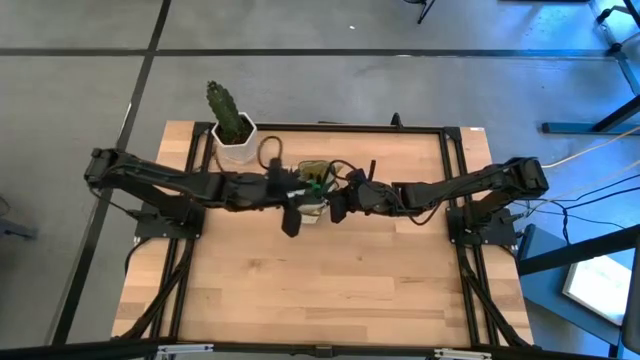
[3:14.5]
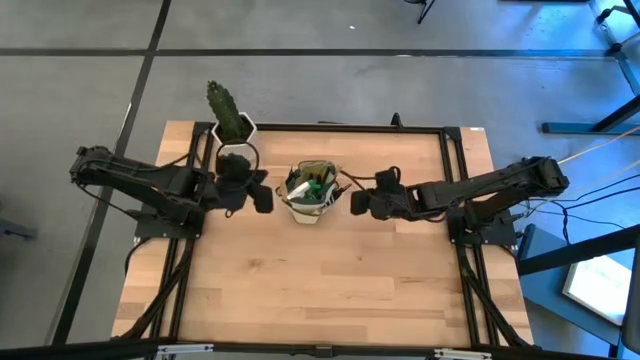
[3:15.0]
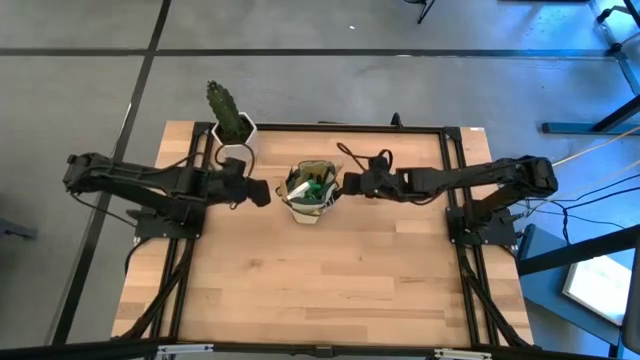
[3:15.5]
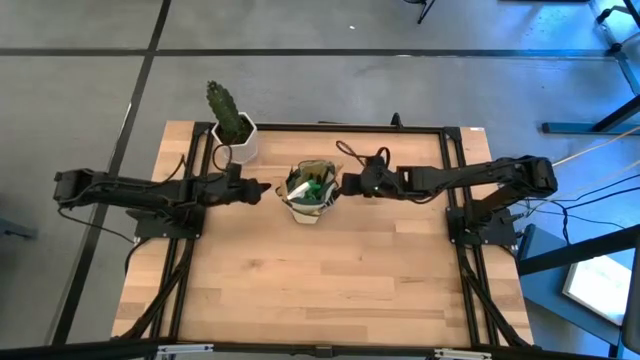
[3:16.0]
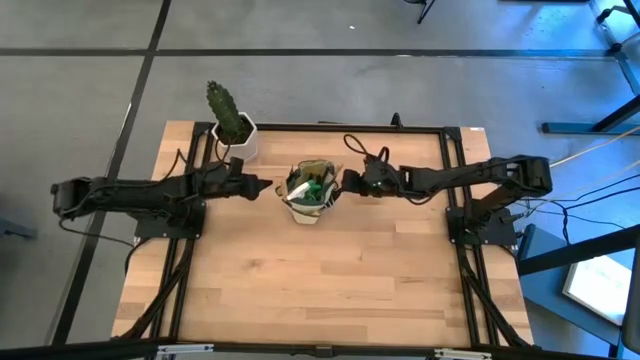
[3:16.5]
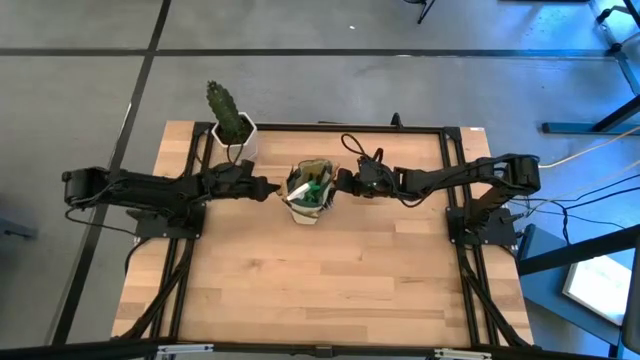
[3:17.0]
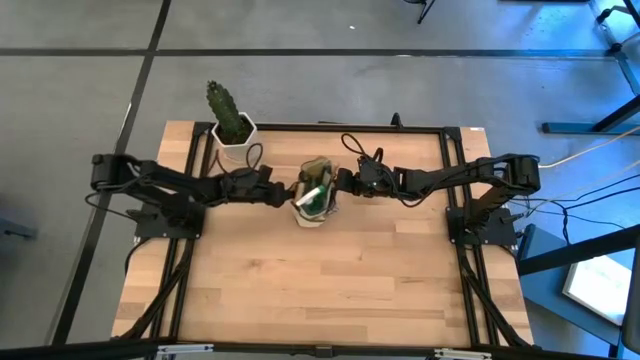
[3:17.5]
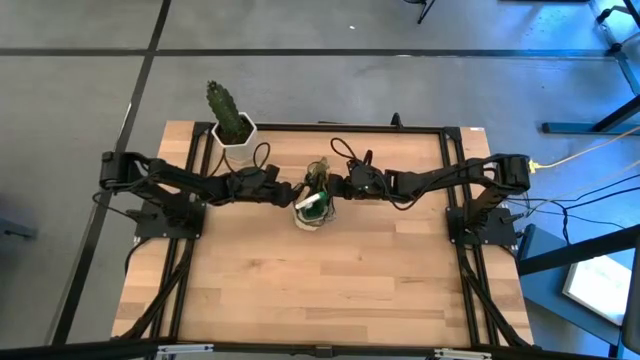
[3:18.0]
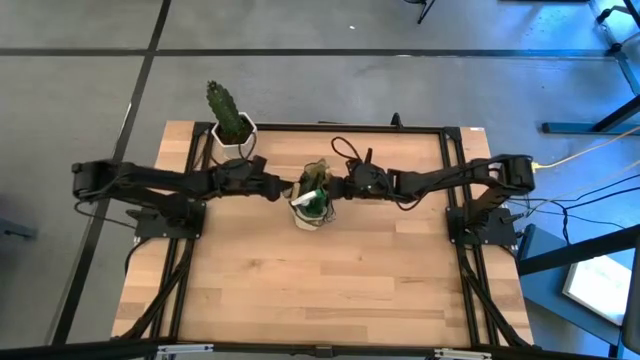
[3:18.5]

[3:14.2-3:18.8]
Task: Pick & Place Garden tools in Gardening bag
Adjust the gardening bag

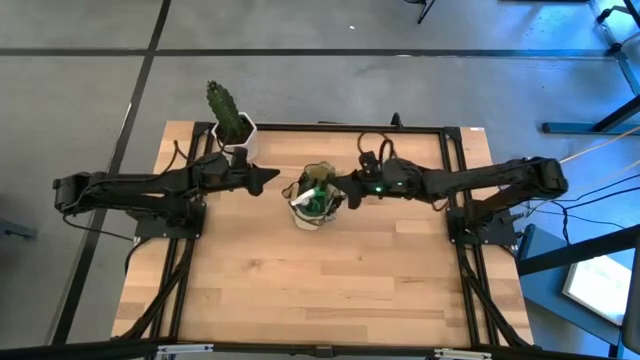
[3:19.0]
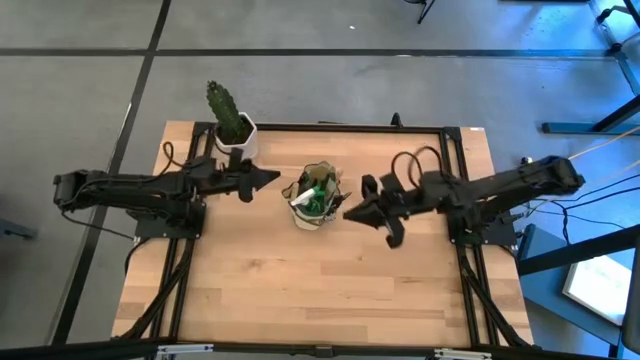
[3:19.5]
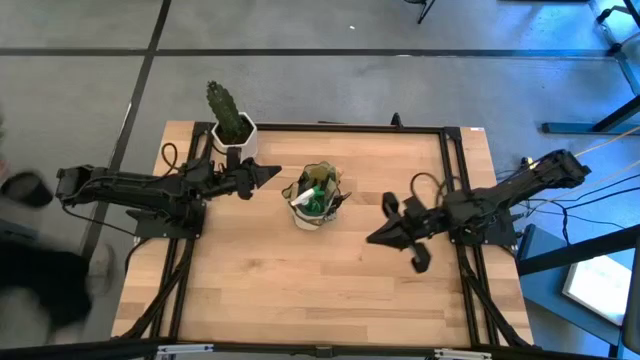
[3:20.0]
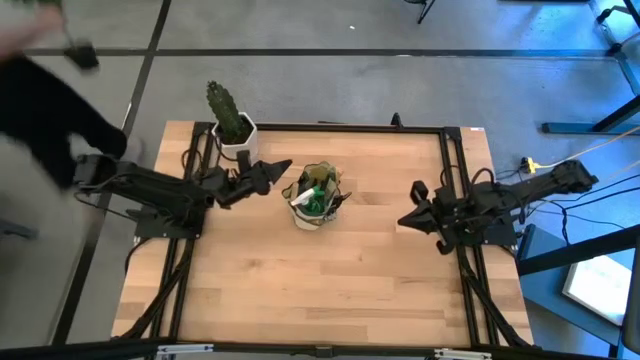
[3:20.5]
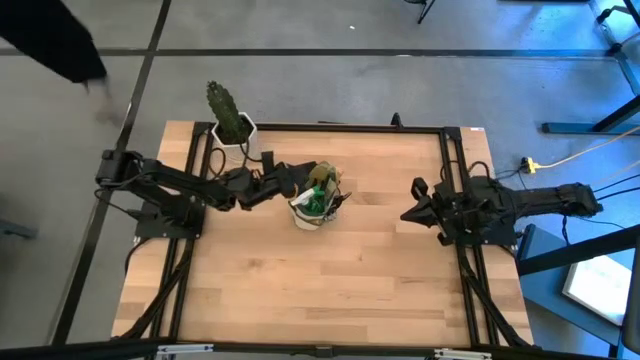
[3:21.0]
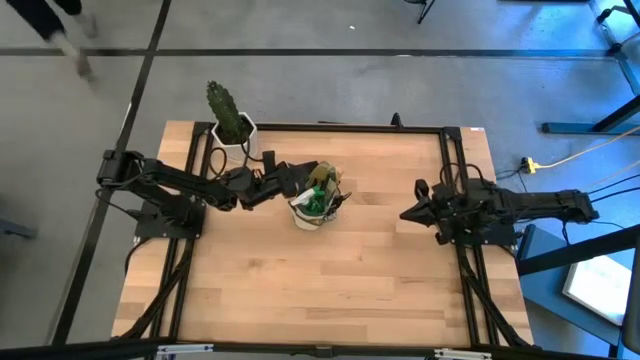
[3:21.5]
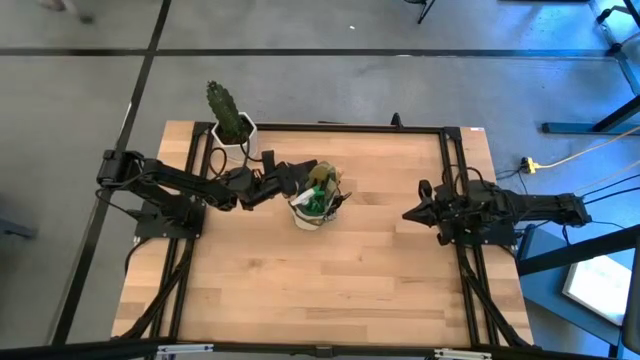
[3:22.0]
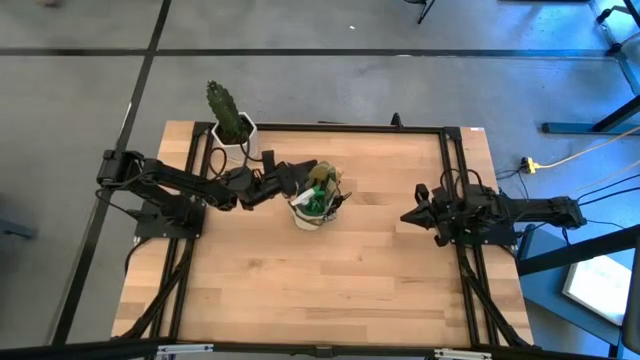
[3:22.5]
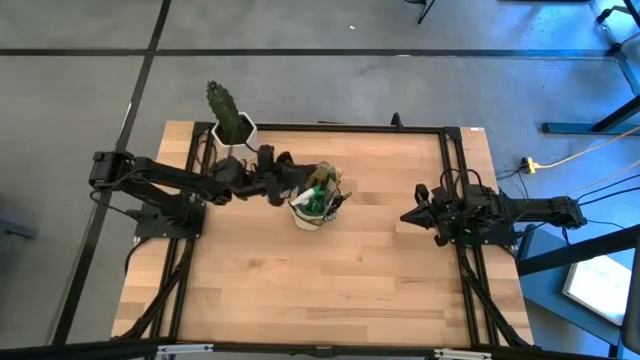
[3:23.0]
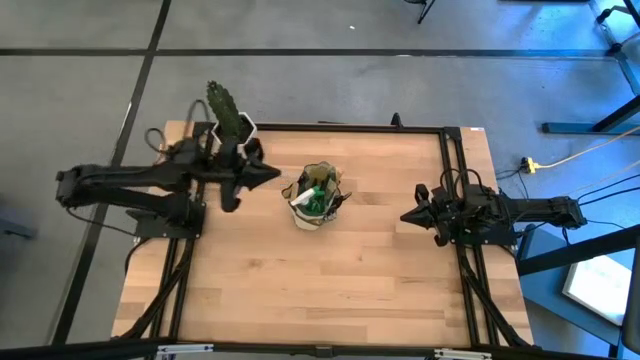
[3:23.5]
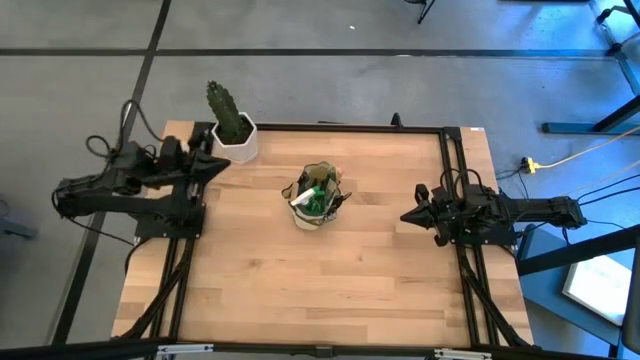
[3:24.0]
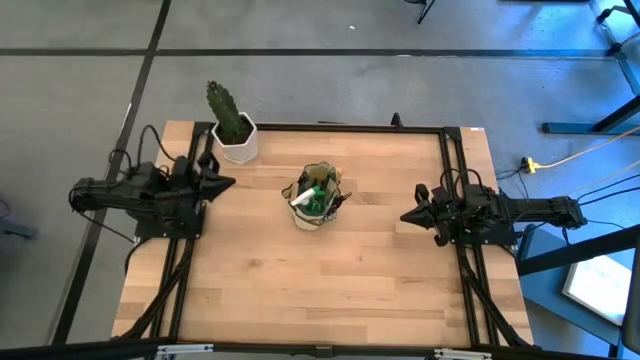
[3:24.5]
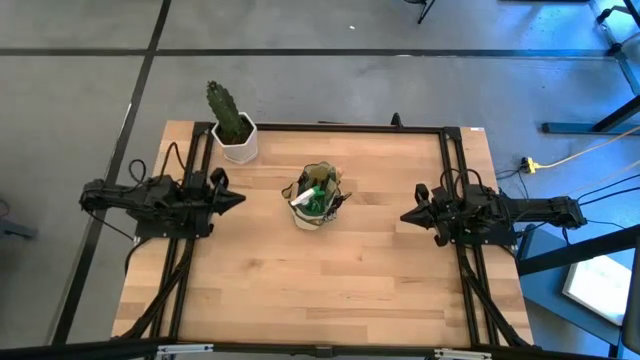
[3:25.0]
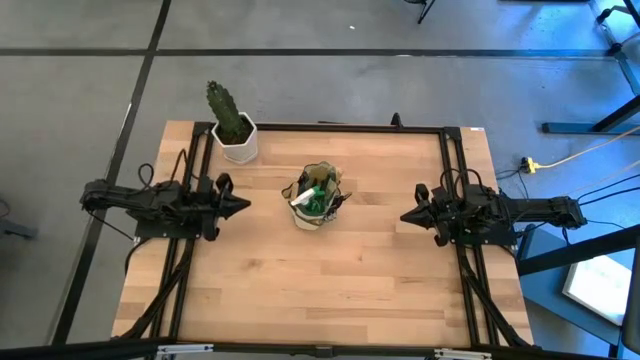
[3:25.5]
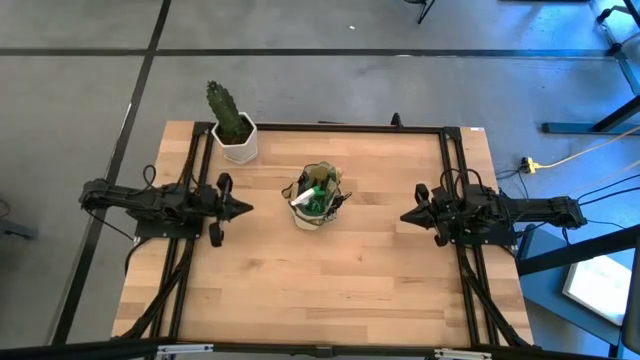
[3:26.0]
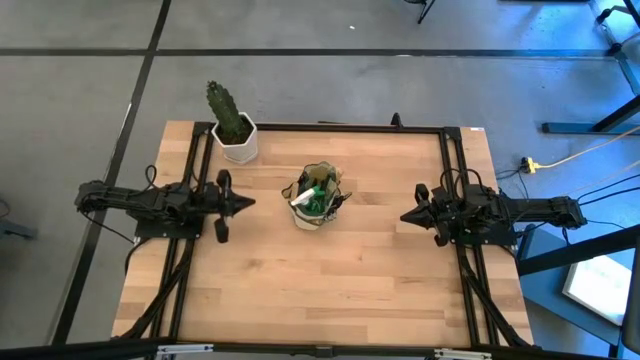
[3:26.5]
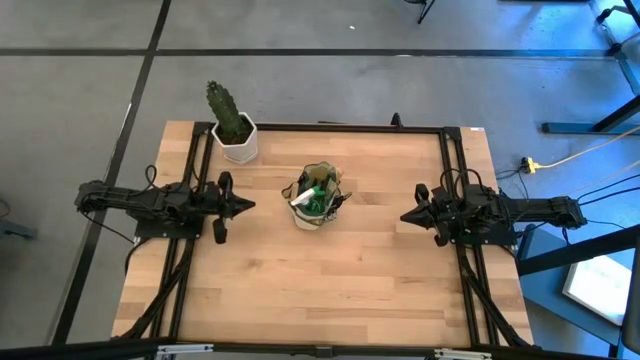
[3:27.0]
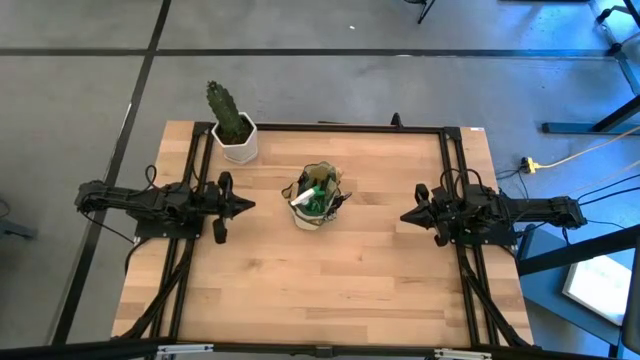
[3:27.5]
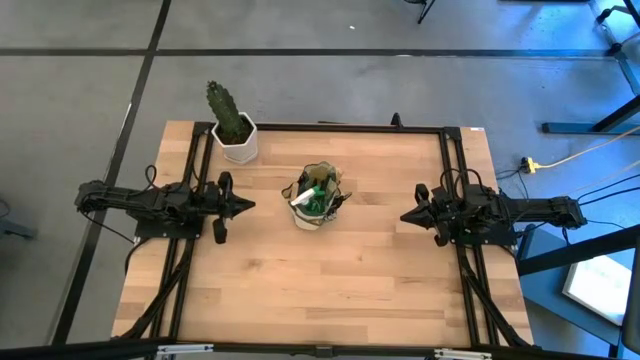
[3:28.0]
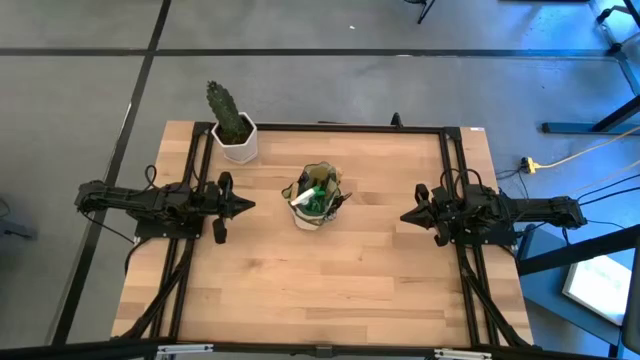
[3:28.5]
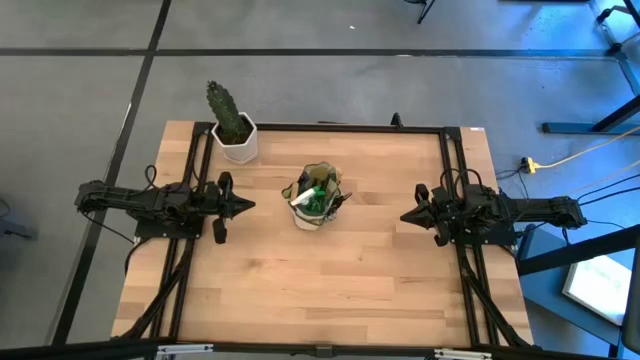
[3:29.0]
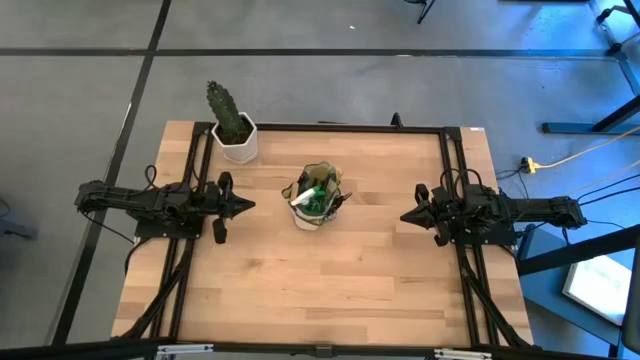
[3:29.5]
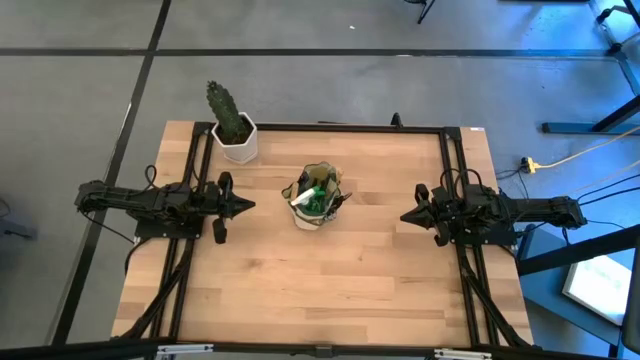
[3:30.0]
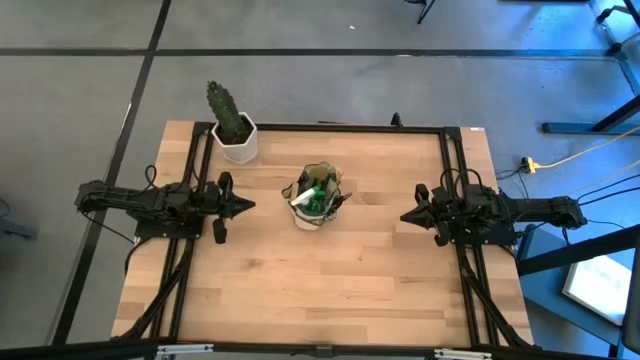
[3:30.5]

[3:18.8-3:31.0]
Return to Home Position

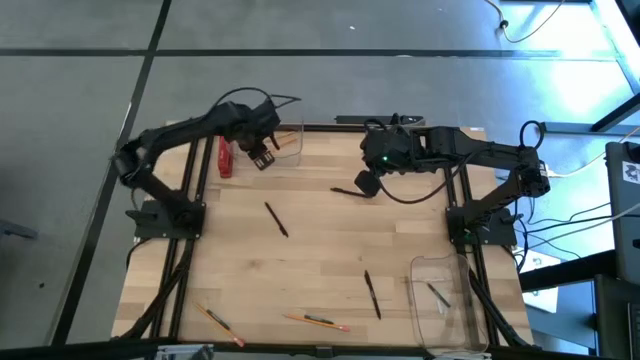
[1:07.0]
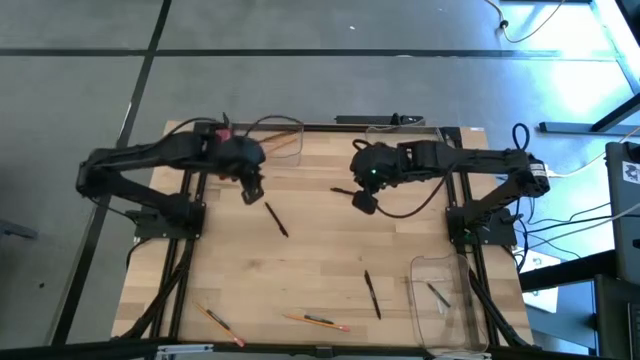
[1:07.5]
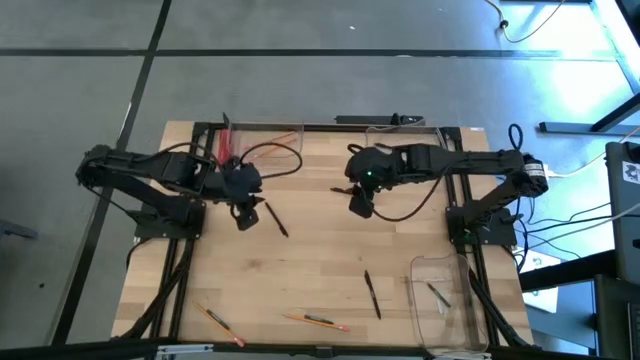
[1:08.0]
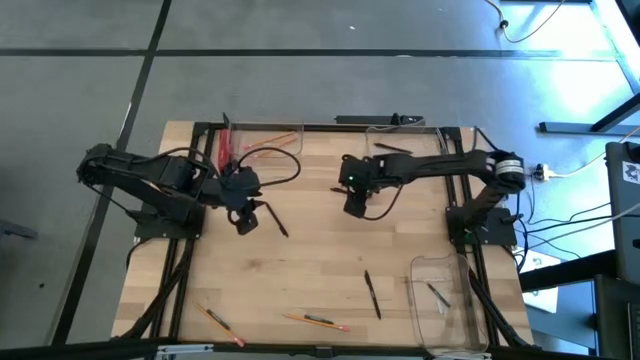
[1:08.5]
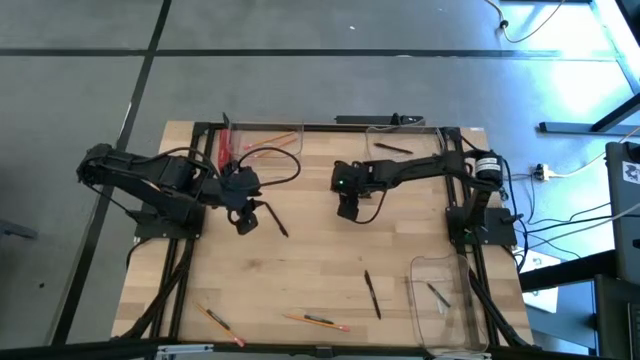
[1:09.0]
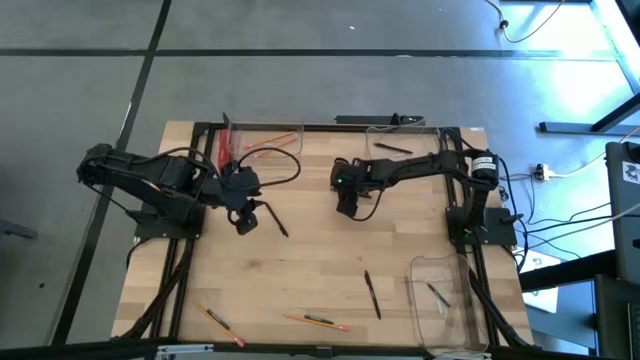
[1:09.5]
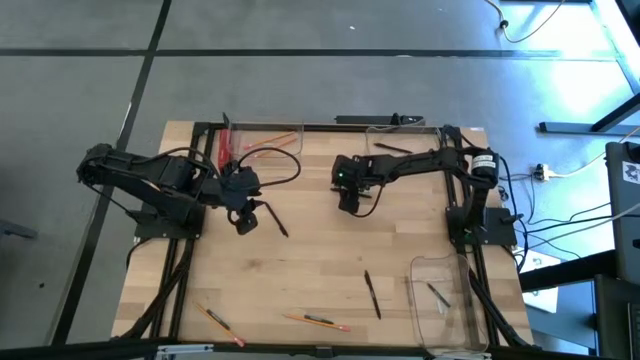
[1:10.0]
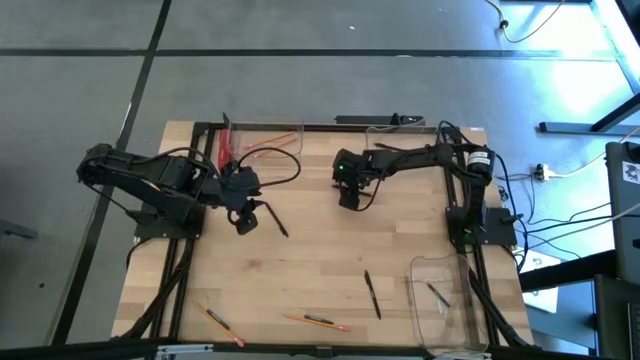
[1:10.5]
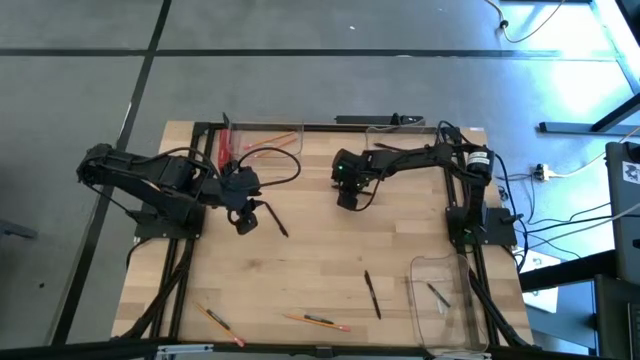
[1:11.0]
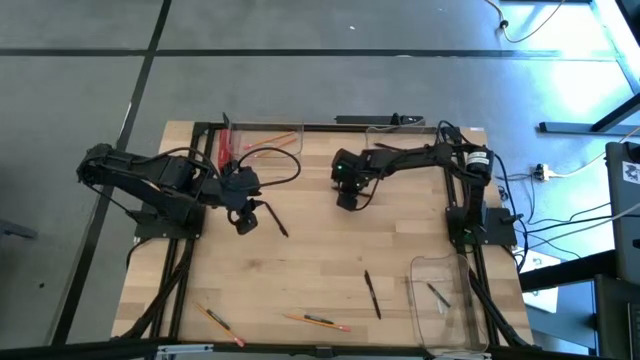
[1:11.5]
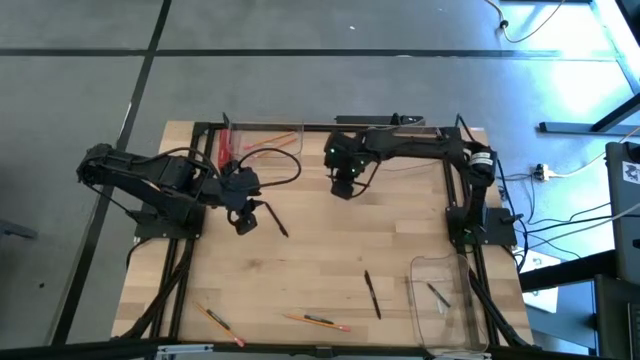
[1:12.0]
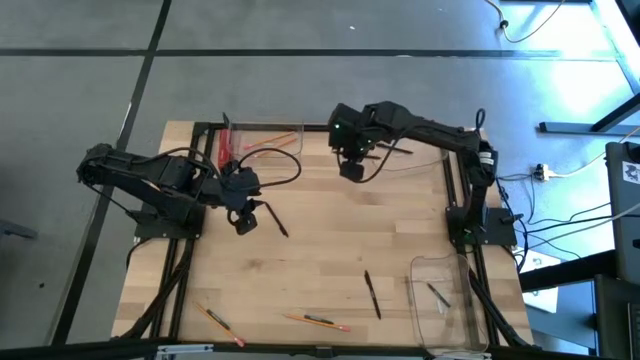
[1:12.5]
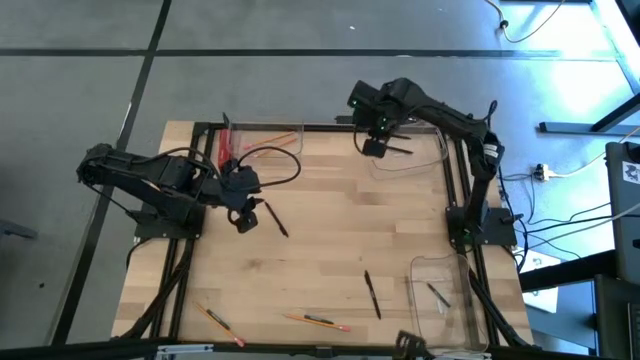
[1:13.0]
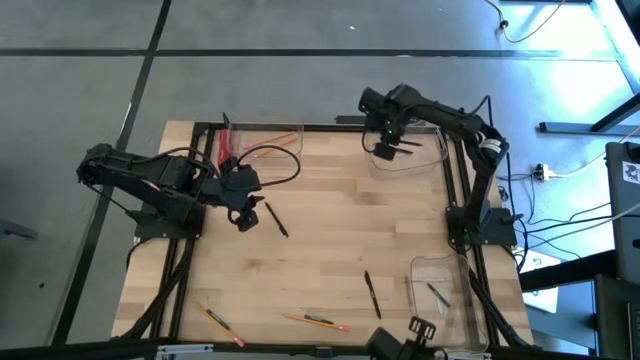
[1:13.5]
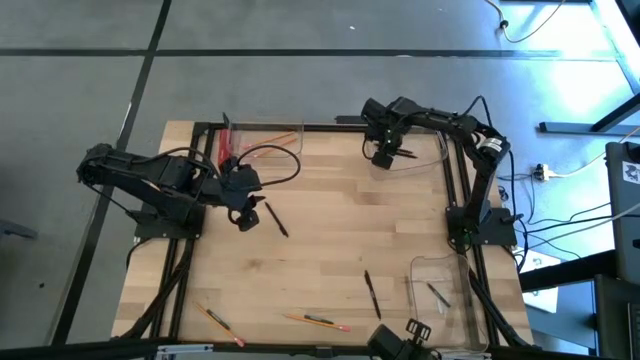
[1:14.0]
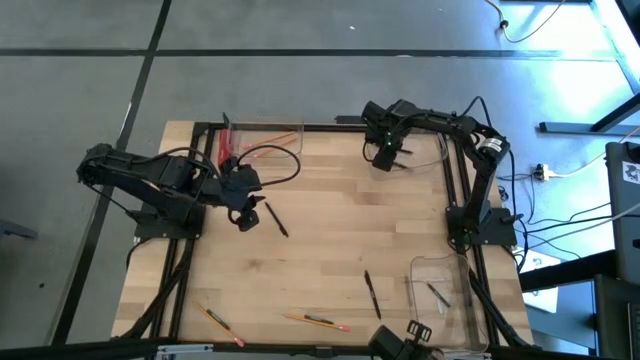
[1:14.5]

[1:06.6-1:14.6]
Task: Sort crayons/erasers/pens/pencils in bins
Put the top right black pen into the top right transparent bin
